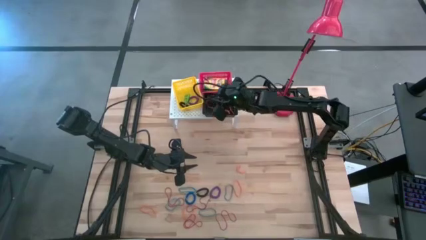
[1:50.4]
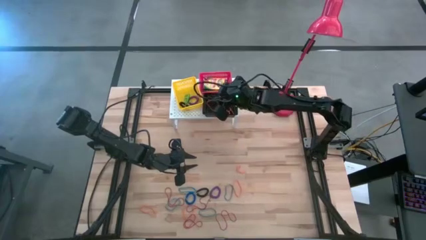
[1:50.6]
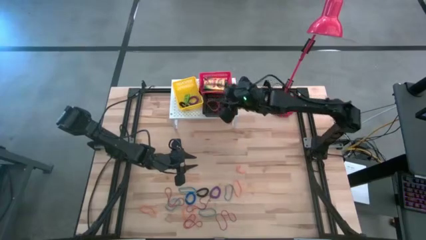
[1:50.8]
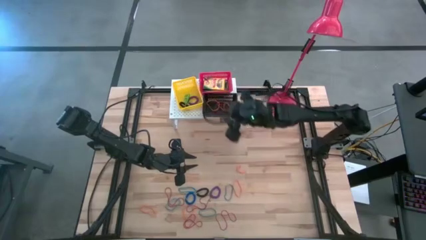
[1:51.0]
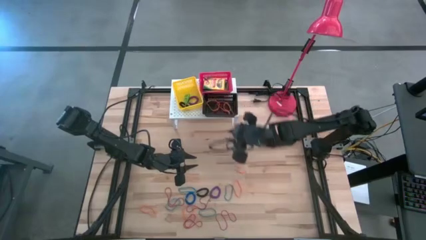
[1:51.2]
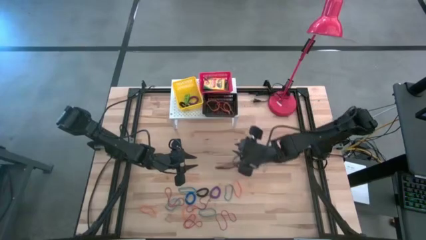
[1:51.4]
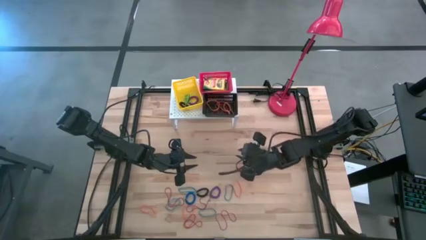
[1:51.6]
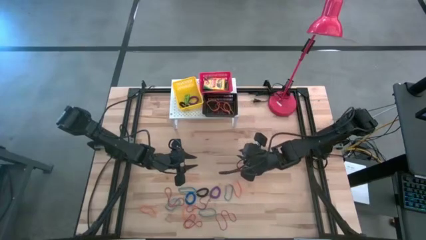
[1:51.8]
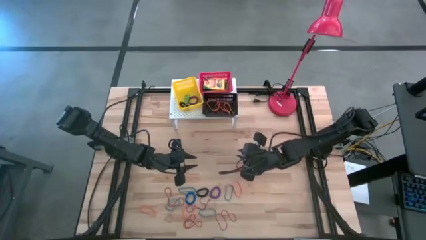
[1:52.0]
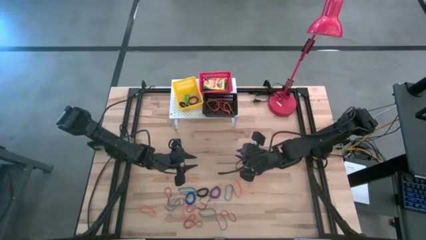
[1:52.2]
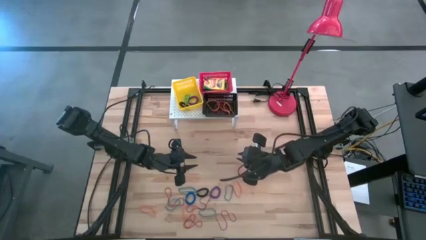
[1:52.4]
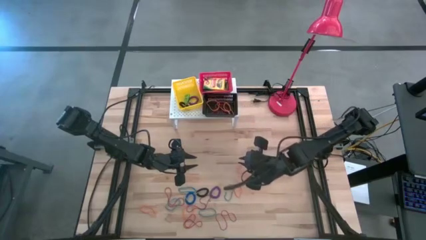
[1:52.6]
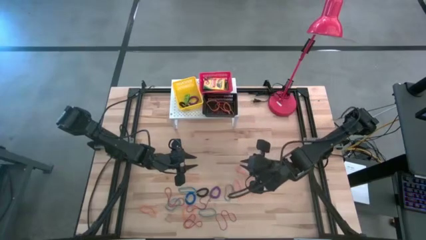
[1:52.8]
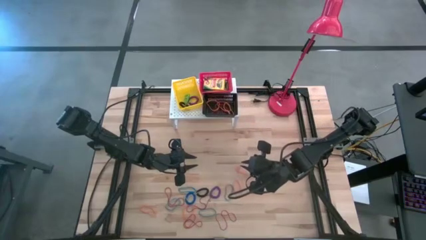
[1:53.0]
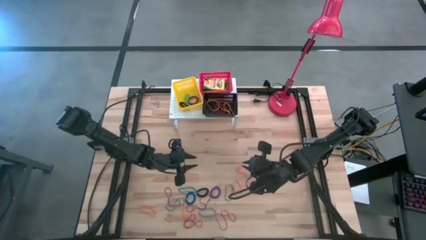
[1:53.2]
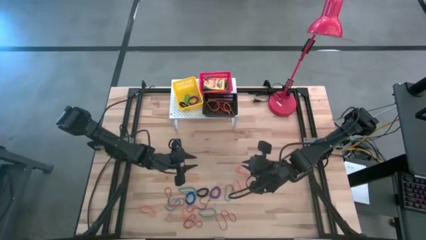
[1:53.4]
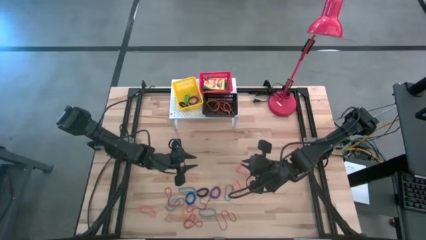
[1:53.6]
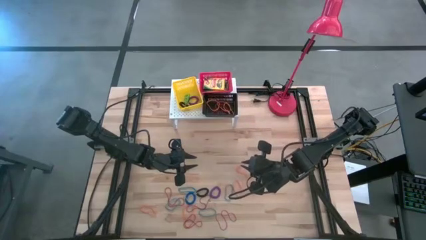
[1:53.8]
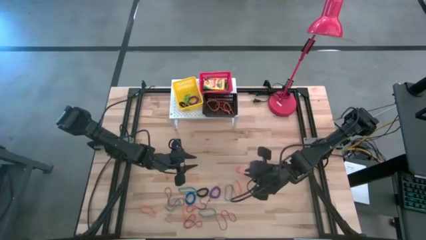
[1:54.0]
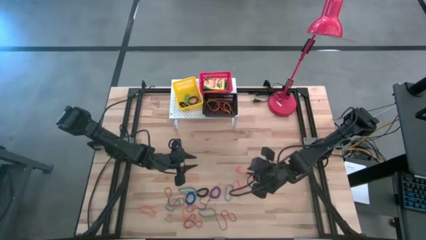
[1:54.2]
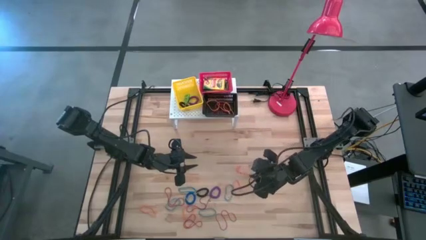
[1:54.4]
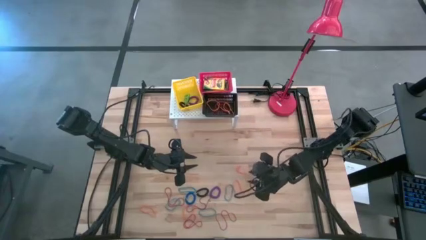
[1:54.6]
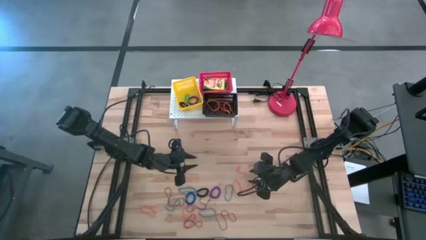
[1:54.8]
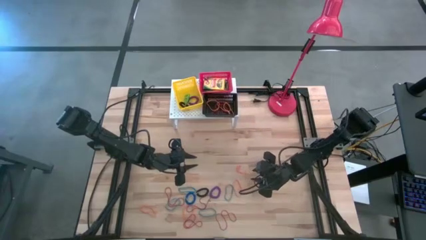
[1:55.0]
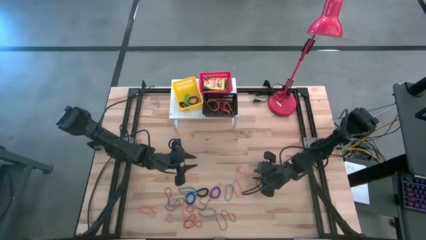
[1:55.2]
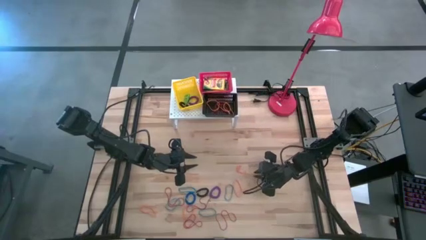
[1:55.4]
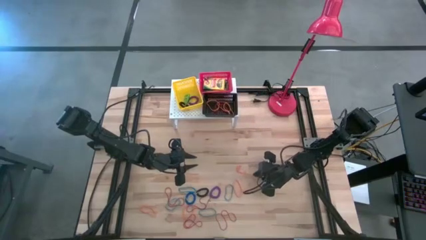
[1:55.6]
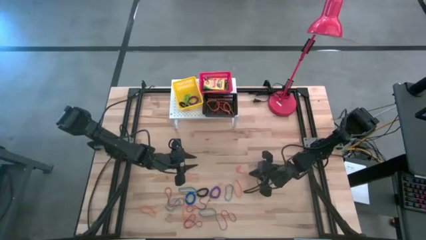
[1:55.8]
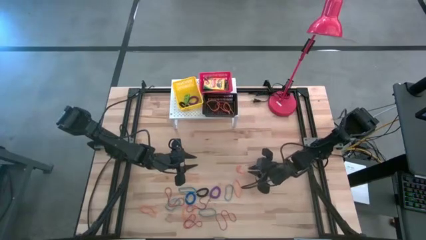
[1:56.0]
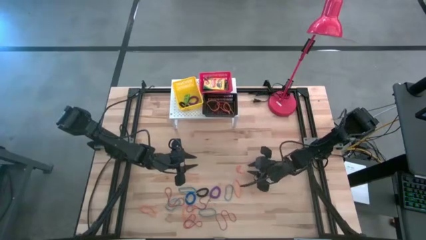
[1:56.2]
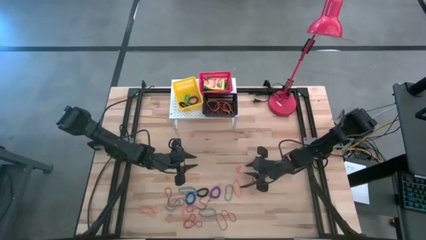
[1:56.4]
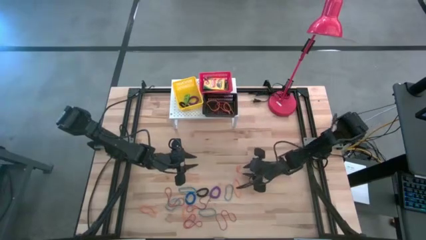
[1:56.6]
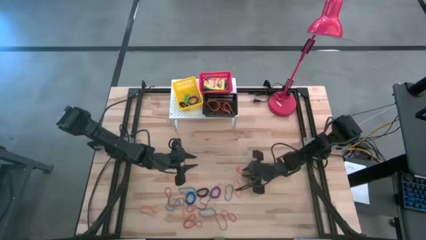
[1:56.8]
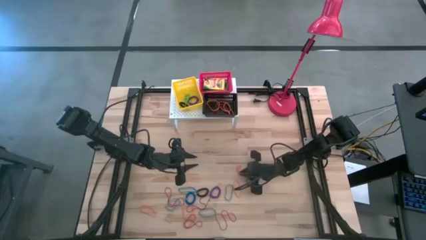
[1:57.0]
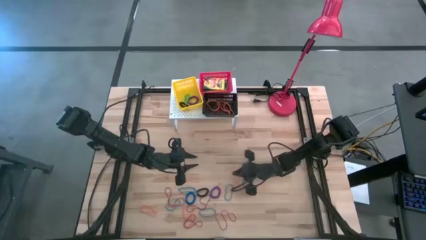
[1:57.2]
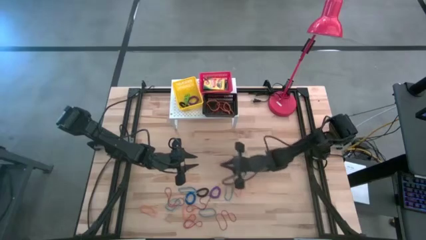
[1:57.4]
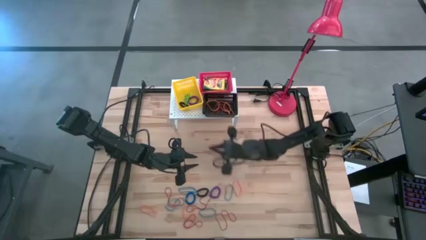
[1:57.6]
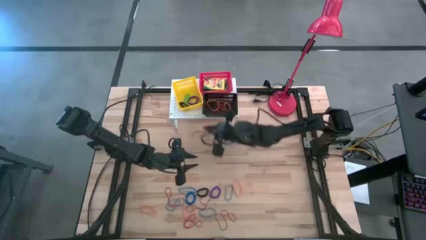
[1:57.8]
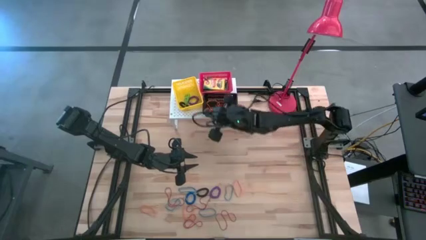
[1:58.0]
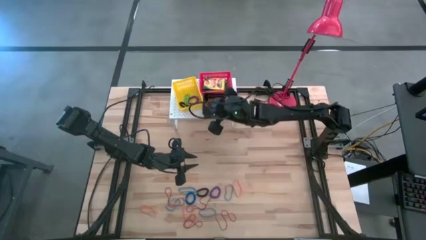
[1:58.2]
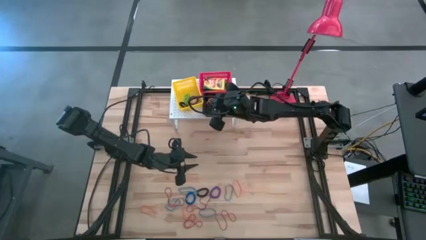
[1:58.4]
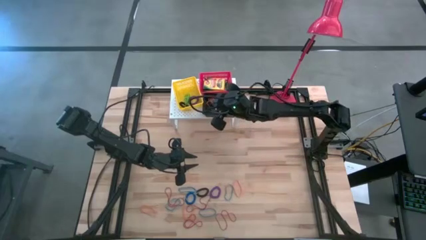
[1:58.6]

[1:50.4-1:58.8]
Task: Pick & Place Office Desk Supplies
Put the orange rubber band into the black bin on the shelf

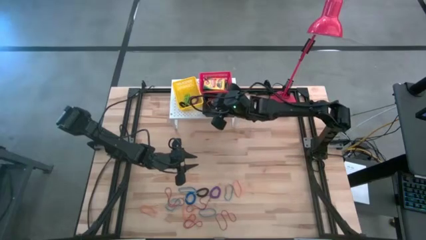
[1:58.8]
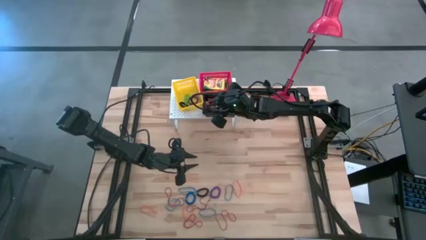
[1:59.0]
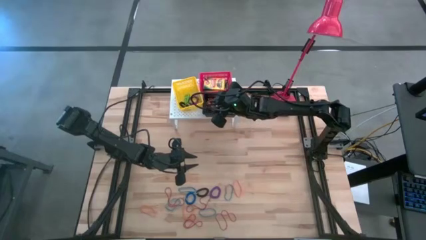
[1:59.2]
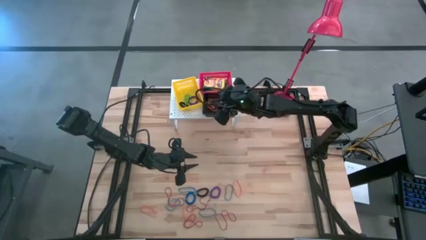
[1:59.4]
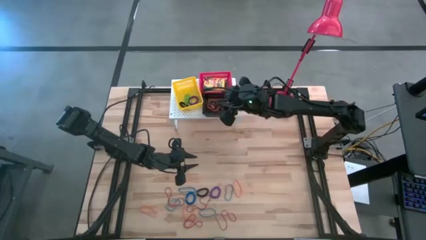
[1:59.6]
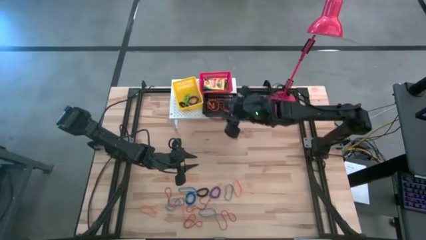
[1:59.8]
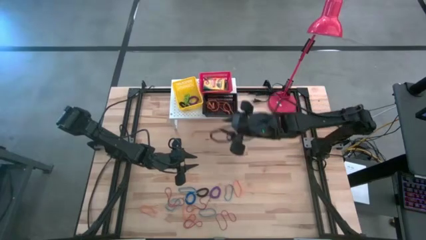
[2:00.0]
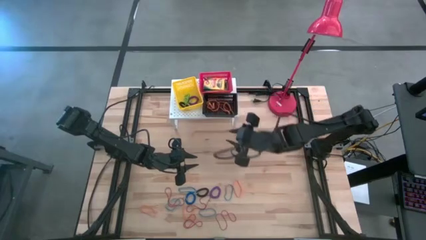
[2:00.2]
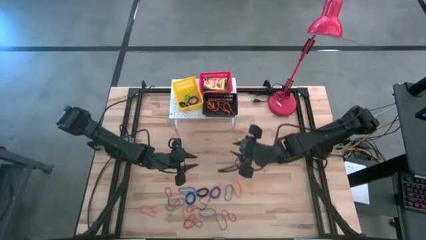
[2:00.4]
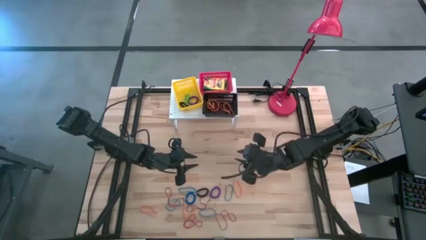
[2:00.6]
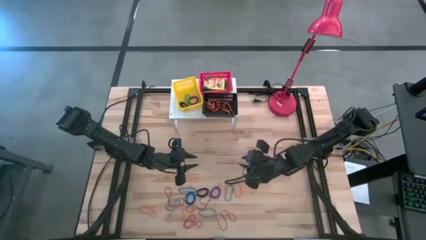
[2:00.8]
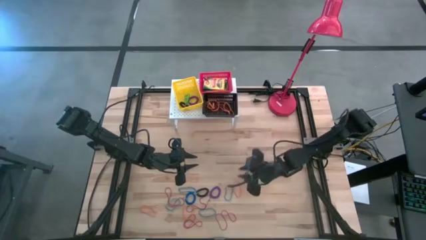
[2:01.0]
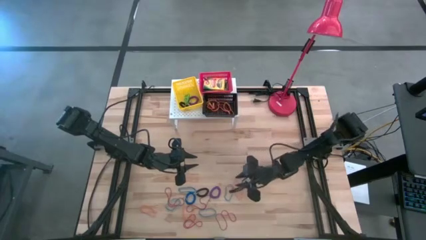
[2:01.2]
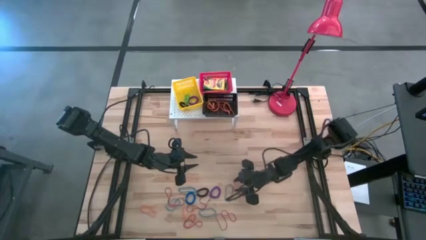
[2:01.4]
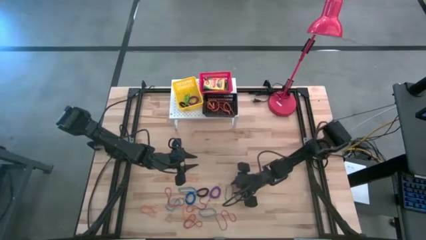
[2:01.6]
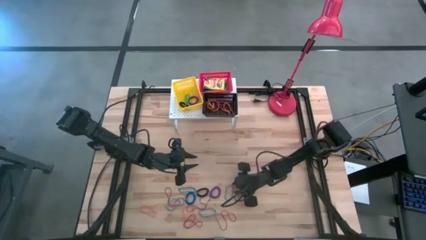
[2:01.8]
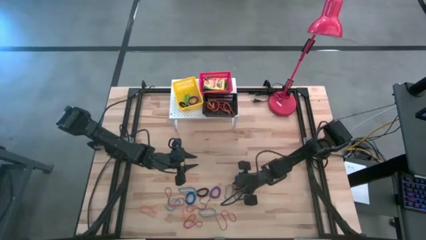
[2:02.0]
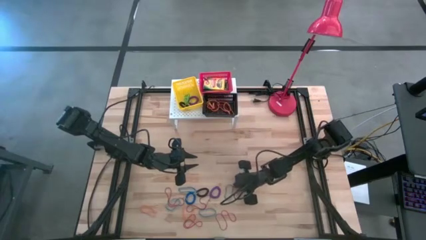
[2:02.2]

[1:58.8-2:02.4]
Put the orange rubber band into the black bin on the shelf

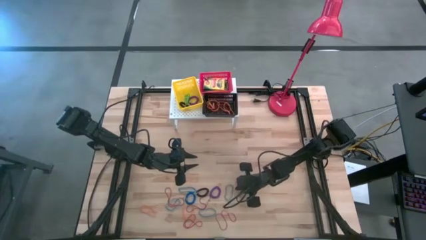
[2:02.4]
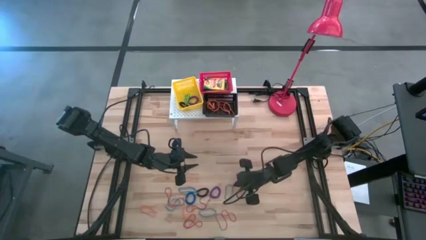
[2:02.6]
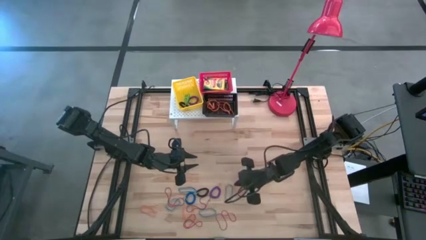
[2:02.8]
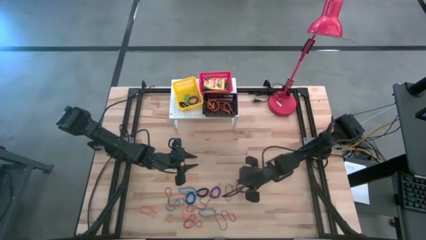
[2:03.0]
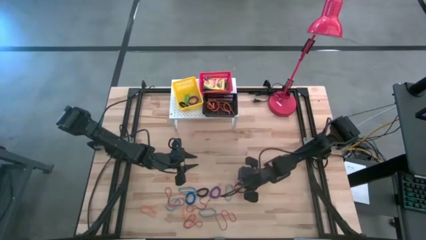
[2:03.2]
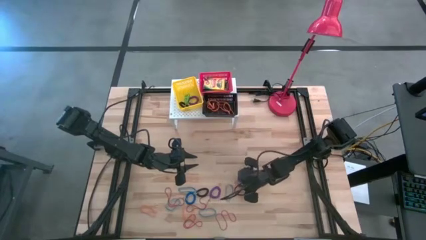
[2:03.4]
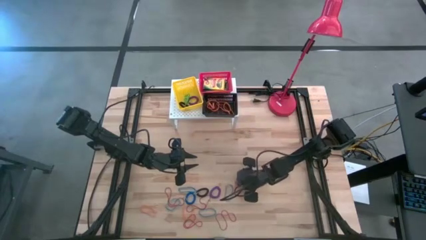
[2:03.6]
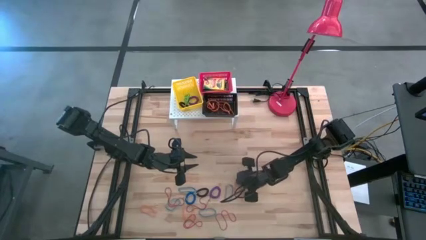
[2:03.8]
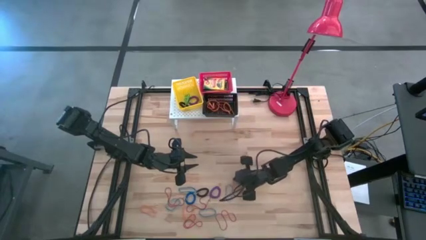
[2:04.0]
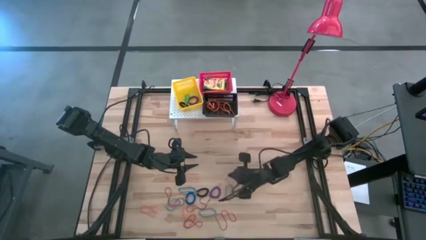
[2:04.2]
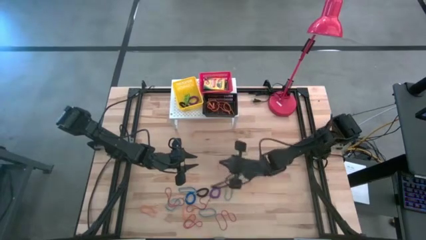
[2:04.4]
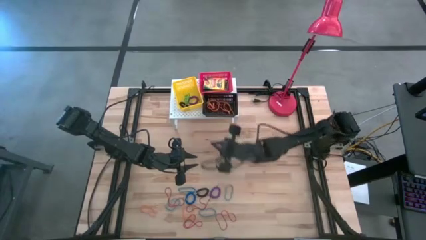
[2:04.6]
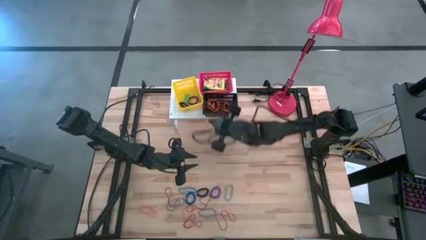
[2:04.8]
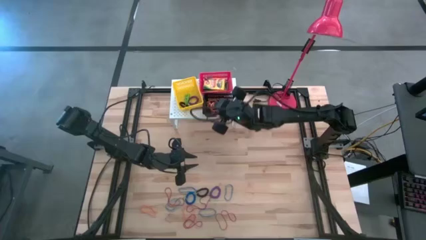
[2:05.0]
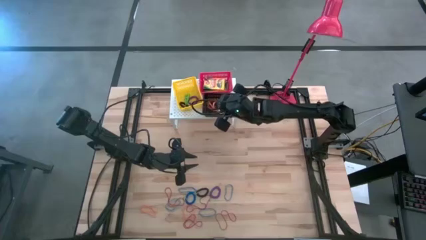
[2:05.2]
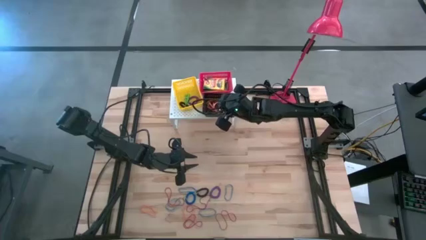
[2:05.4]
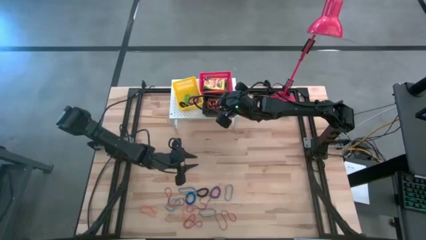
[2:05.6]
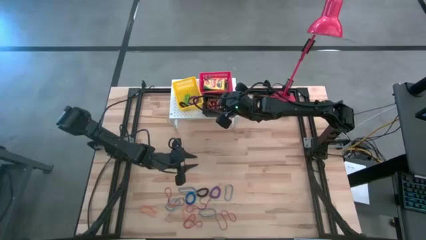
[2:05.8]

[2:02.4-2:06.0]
Put the orange rubber band into the black bin on the shelf

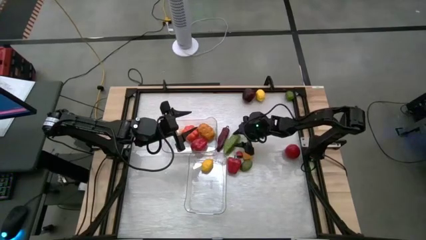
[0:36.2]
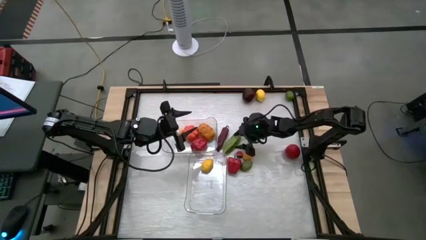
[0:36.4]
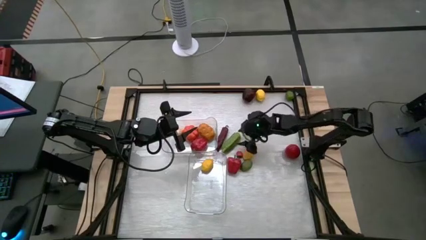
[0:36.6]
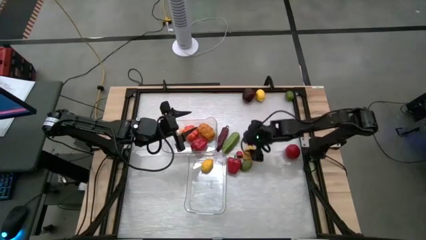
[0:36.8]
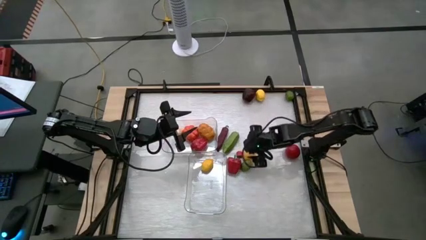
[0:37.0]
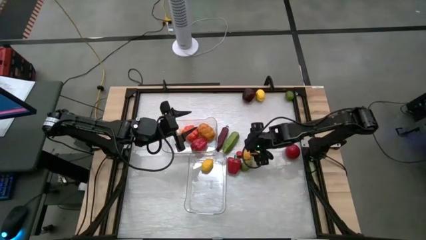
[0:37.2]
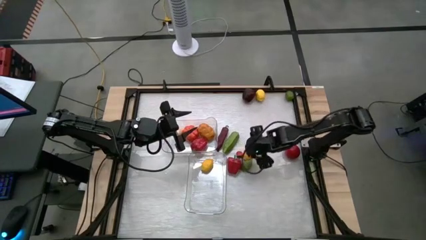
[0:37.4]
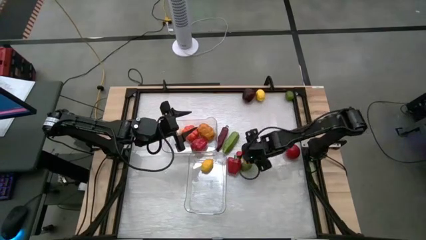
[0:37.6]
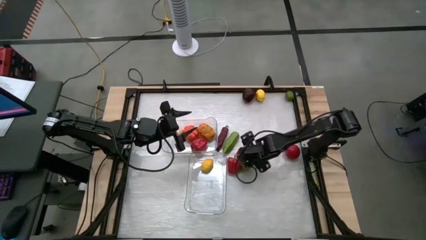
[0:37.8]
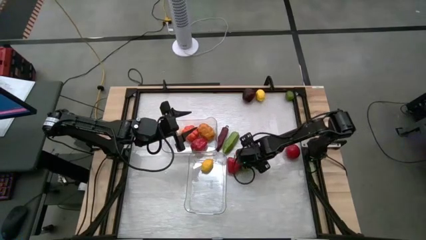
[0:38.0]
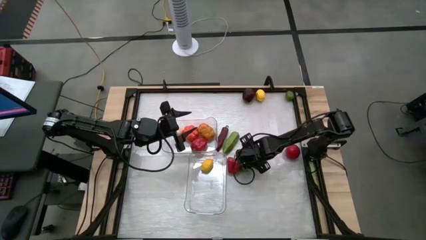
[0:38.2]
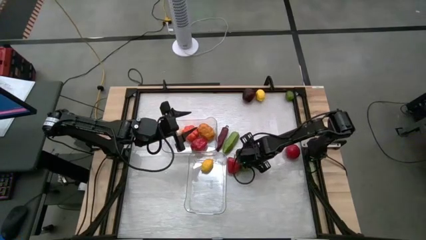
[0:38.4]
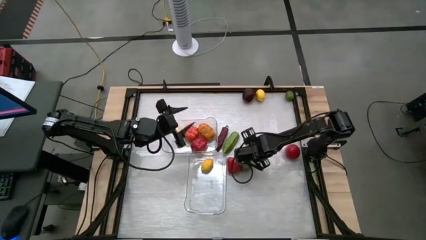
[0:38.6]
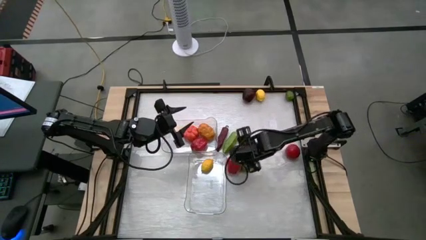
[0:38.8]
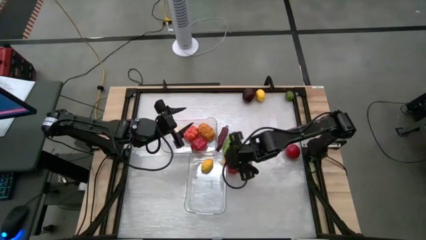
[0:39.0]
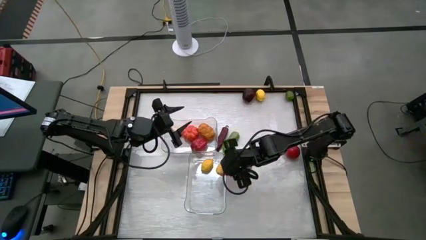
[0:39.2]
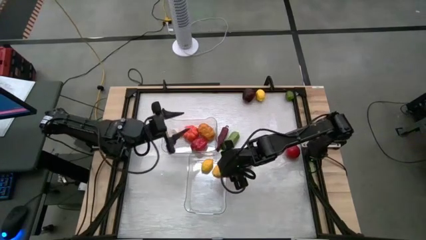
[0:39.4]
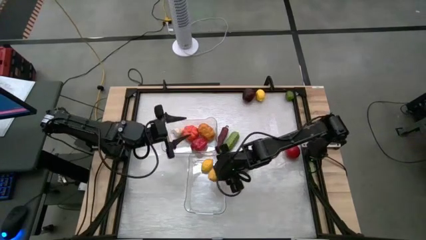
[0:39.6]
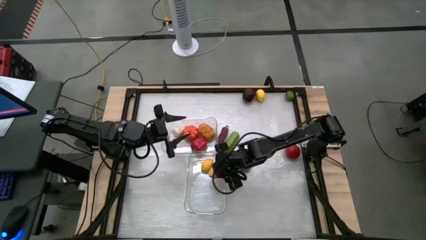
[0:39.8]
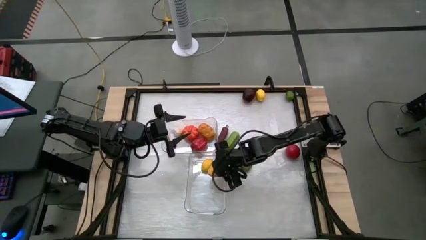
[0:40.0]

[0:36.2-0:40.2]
Task: Sort produce into baskets
Put the bottom lemon into the bottom transparent bin
